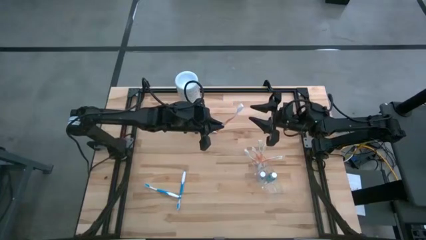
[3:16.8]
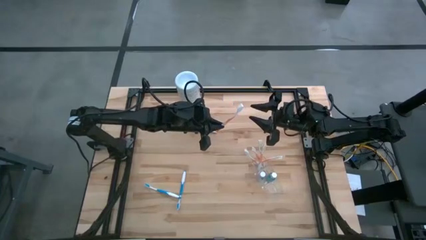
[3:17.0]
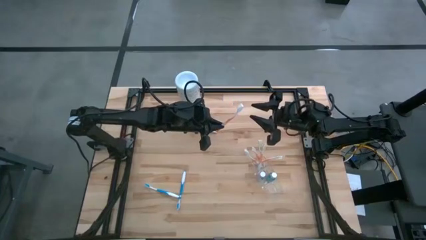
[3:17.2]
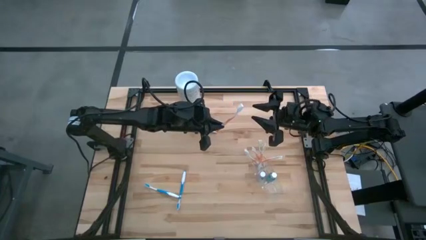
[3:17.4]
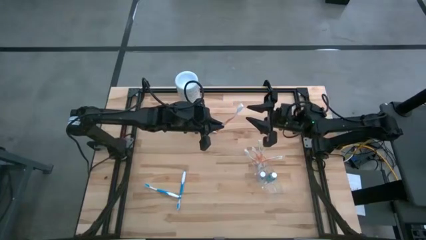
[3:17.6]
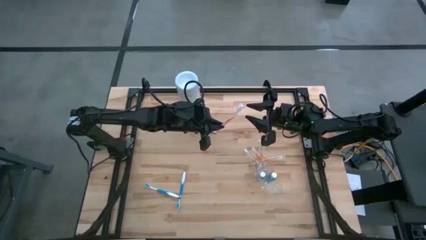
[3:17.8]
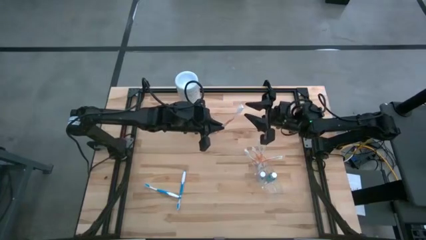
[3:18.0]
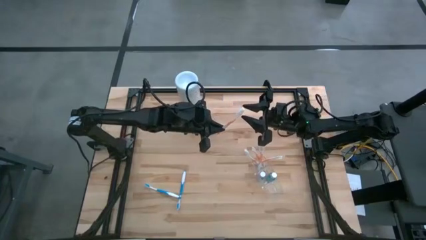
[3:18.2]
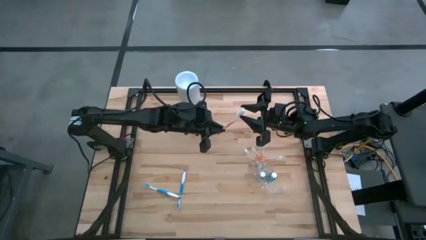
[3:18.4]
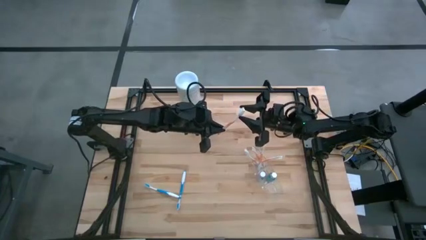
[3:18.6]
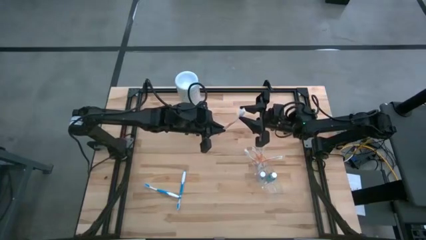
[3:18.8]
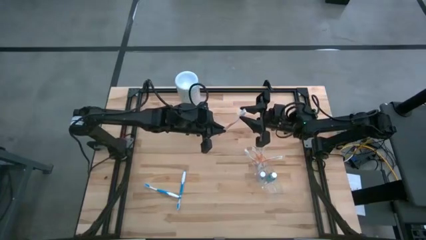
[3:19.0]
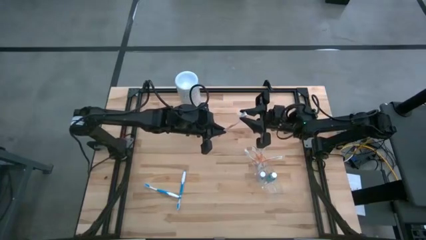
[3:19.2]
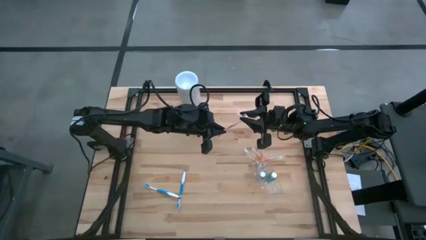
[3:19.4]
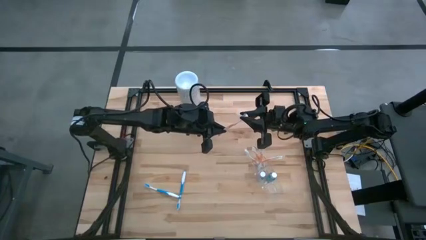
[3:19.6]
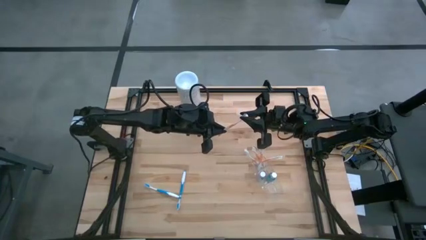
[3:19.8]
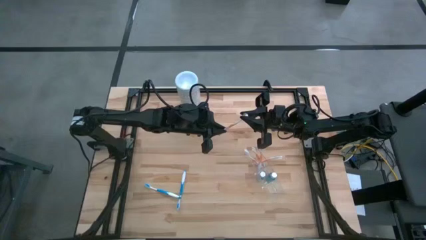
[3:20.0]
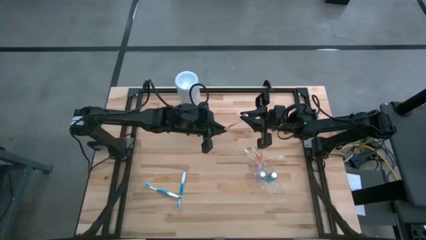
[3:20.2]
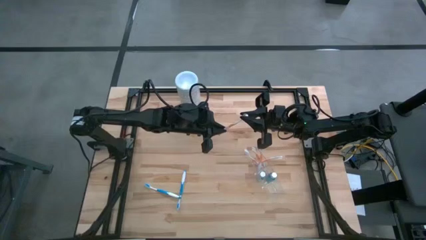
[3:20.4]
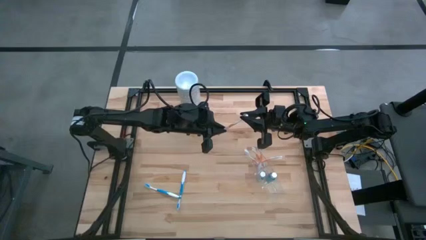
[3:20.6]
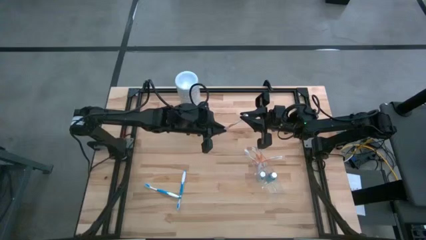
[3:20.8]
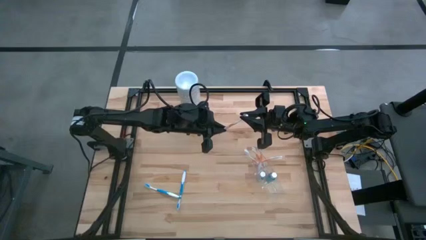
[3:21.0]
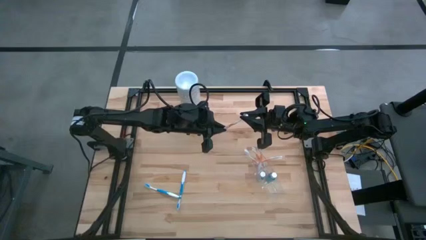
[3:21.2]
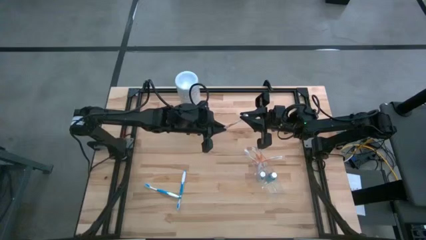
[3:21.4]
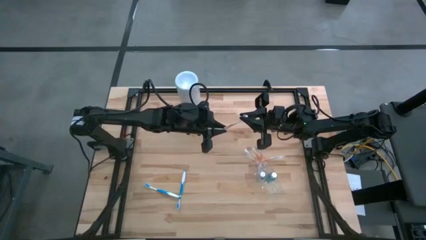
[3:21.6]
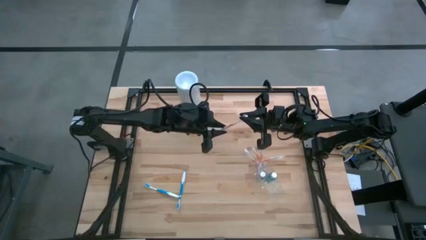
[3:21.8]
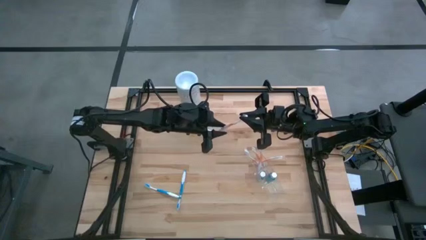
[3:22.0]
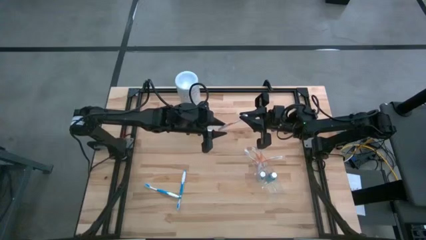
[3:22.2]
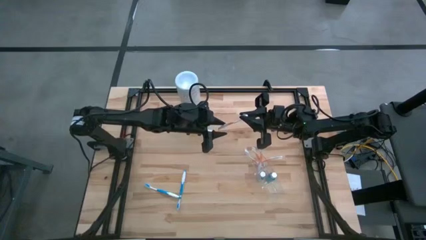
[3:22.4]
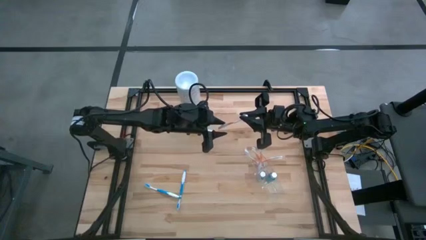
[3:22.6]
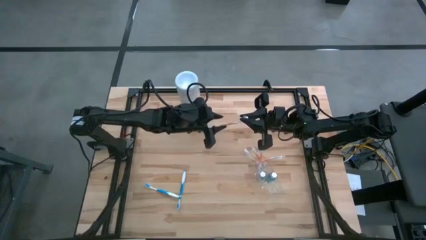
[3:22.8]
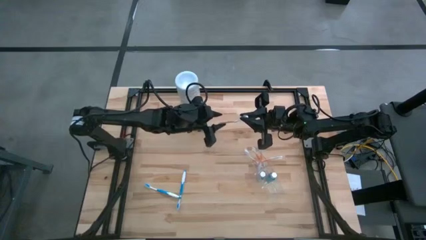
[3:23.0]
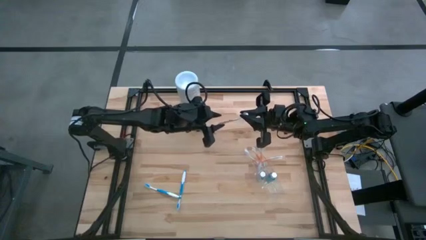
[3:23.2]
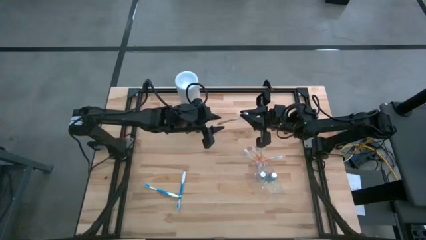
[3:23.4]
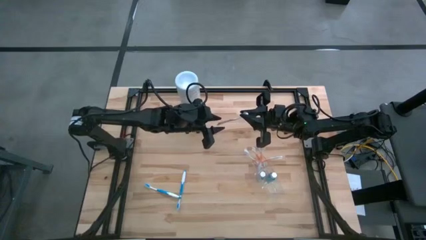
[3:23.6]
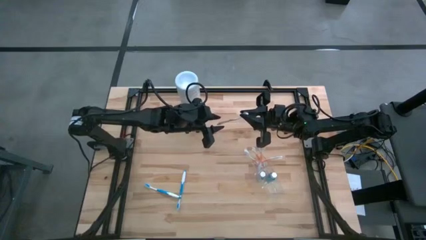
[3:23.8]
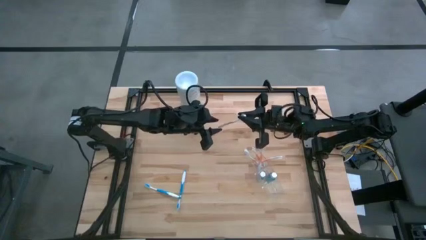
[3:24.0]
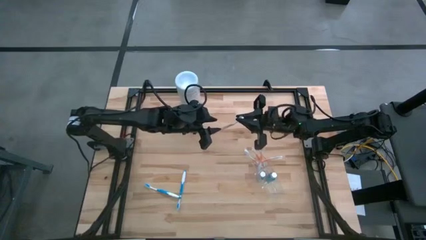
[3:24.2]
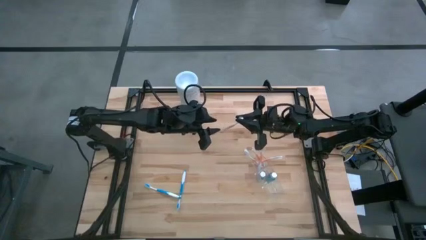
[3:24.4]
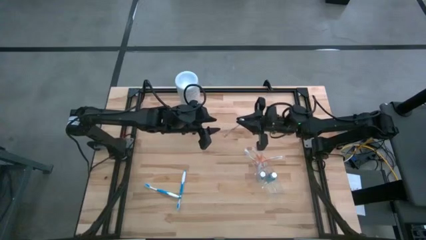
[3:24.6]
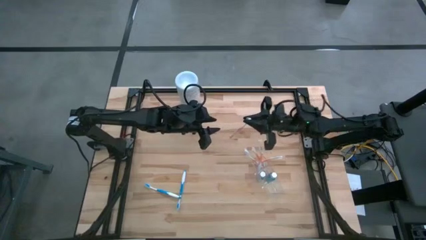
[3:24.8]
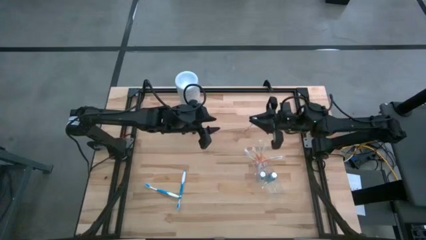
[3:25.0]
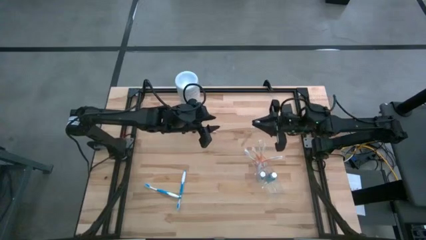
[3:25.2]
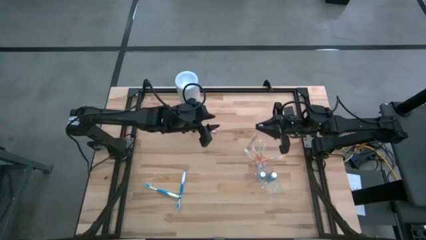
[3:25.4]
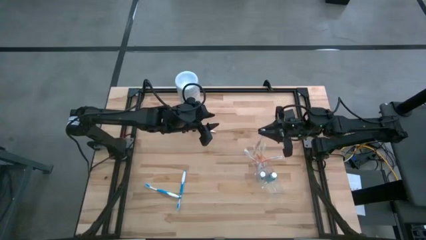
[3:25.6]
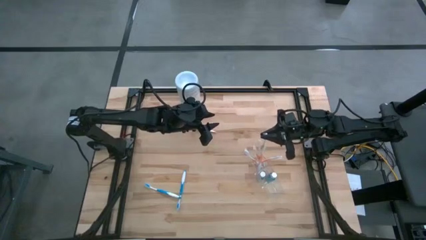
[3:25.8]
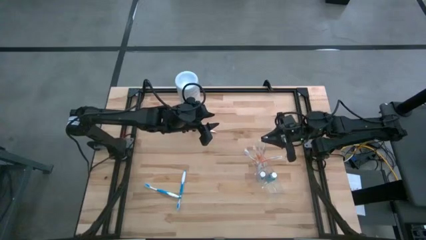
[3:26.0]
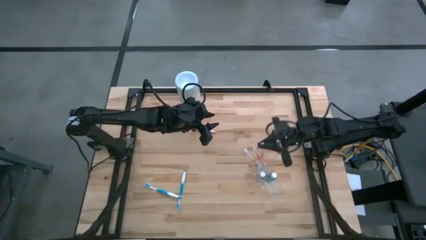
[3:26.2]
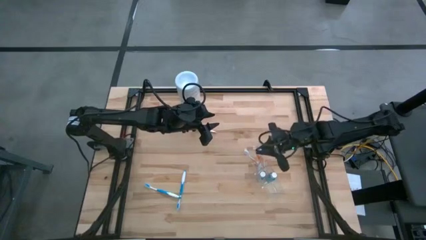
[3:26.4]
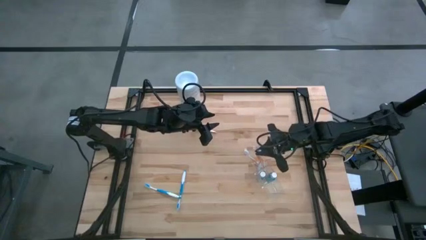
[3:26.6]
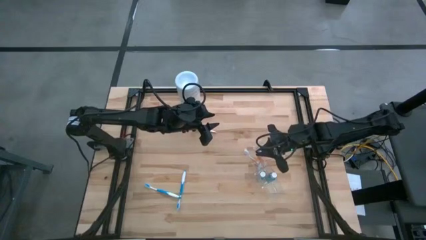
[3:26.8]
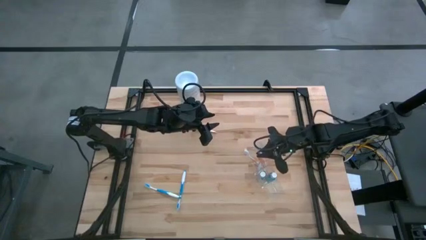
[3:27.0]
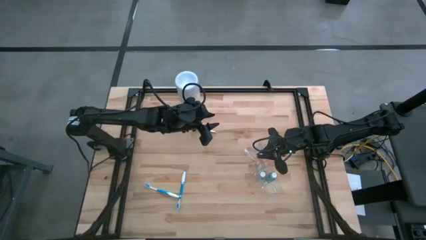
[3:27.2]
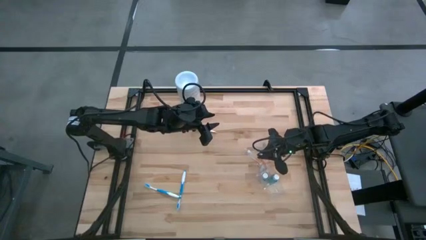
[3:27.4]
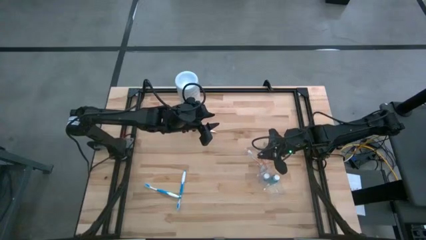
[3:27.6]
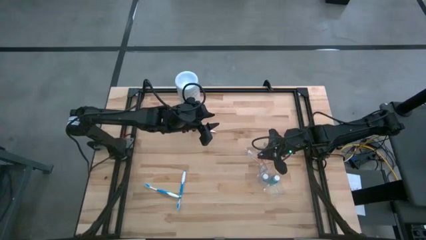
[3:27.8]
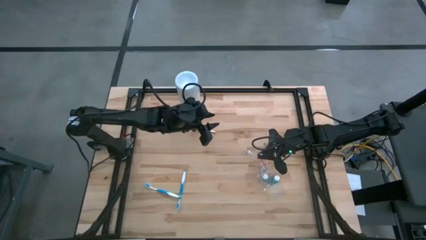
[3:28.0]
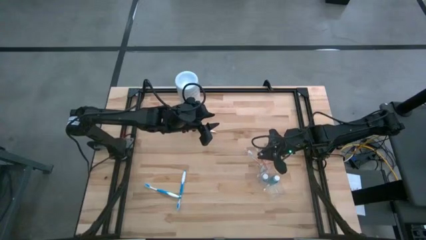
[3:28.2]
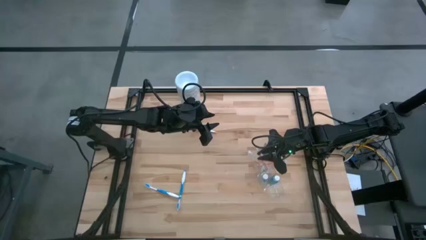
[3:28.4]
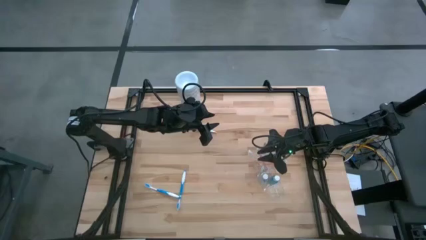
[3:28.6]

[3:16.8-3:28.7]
Task: Pick & Place toothbrushing station
Put the orange toothbrush into the top section of the transparent organizer

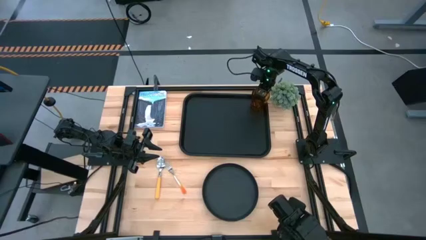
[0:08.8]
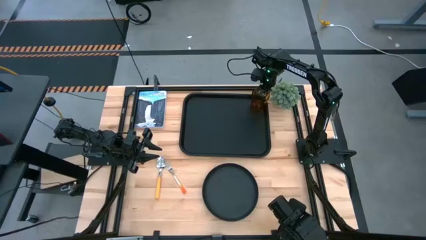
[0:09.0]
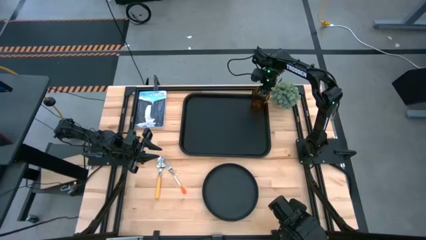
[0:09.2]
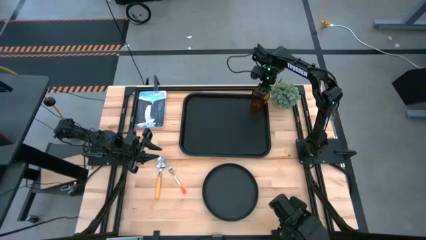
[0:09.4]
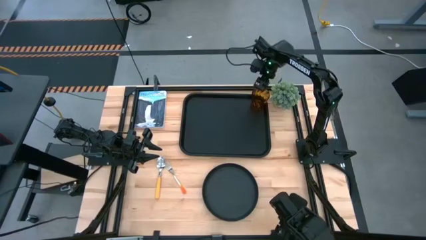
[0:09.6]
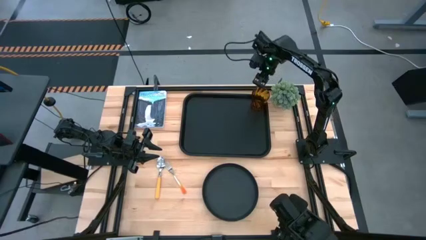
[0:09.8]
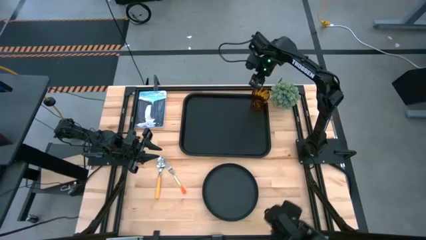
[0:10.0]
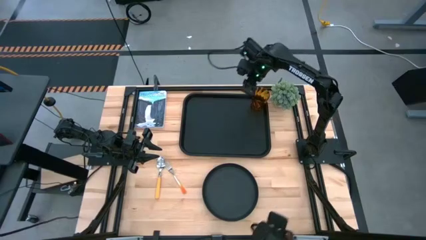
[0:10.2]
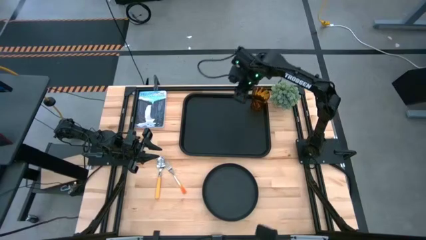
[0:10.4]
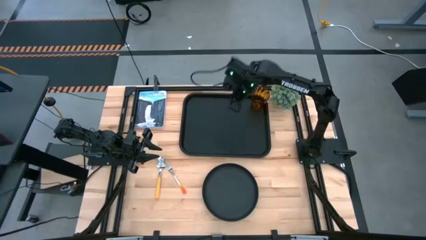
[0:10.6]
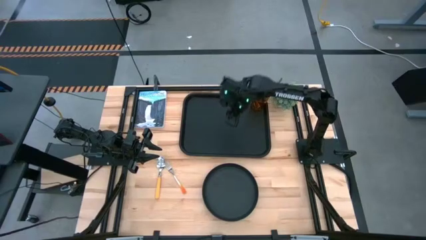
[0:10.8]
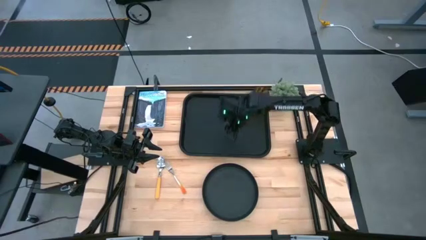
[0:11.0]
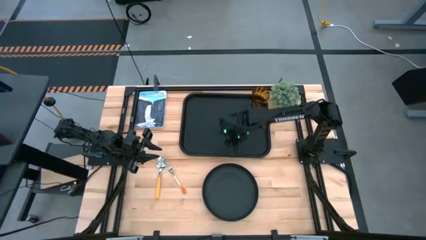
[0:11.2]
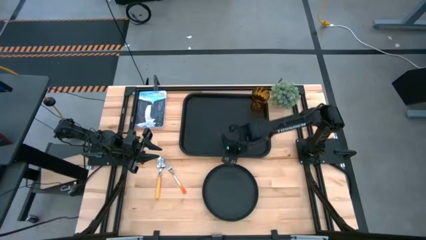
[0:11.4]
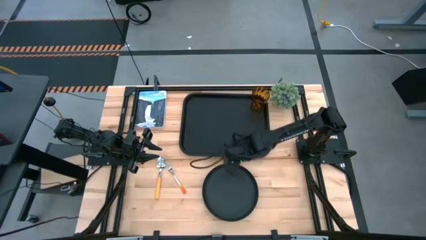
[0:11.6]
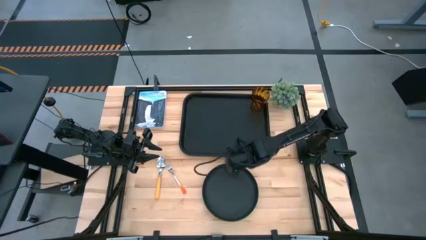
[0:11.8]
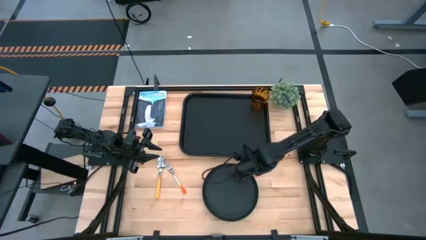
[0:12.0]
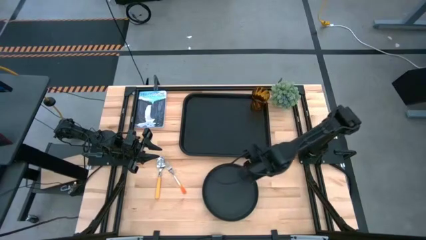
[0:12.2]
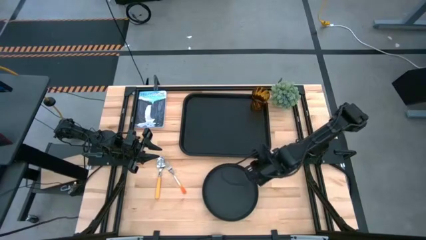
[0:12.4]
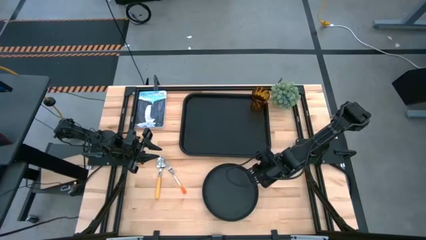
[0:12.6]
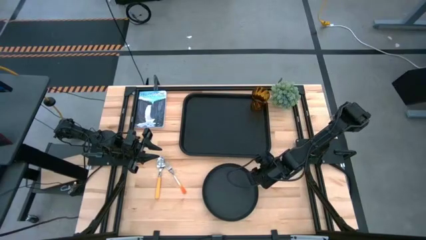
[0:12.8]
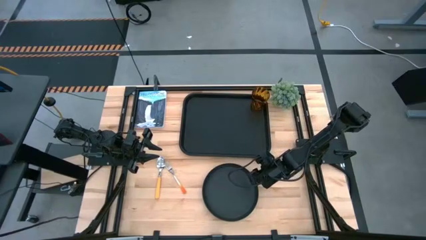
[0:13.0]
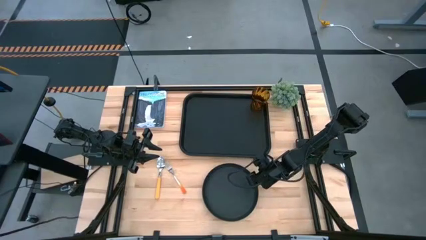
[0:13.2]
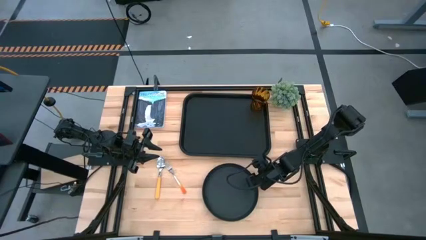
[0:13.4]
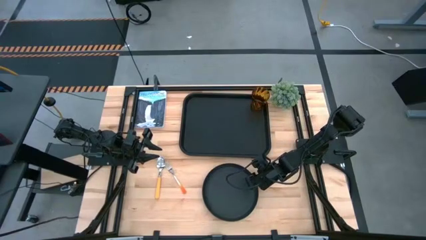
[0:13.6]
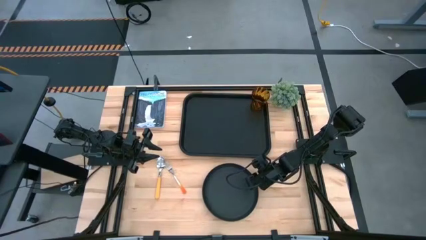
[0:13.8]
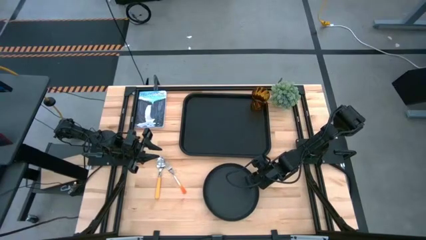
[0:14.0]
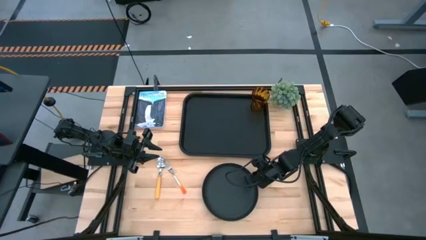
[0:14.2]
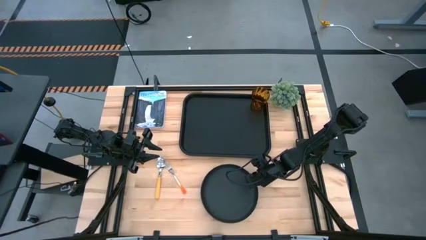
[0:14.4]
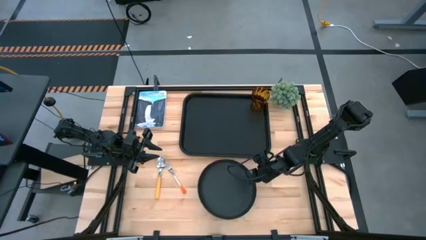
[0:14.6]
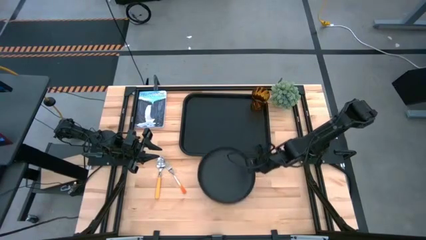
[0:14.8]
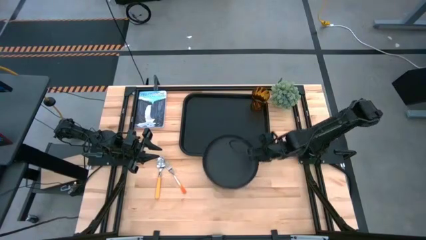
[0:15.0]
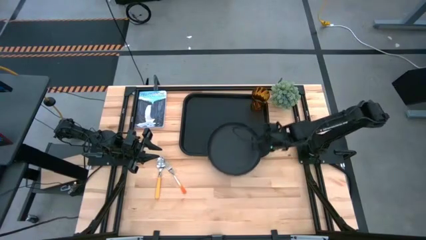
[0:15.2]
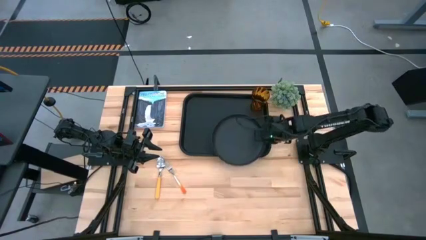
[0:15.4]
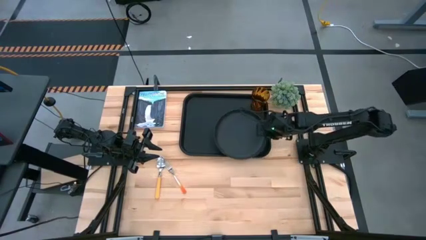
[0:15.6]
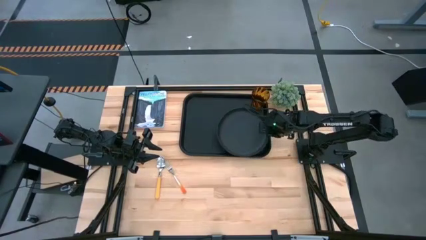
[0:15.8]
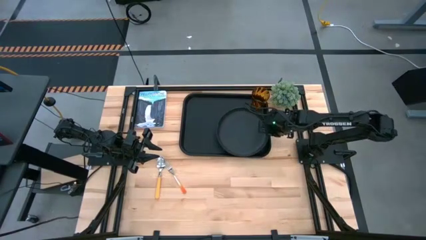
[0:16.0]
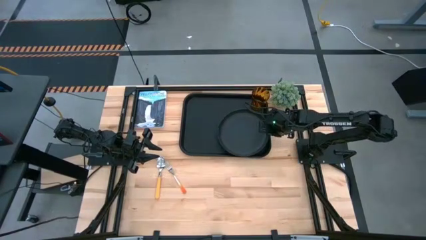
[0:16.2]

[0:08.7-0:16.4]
Task: Pick and place plate/cup/fork/spoon on tray
Put the black plate on the black tray
